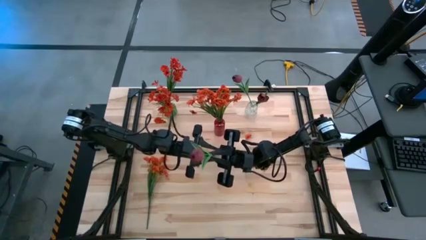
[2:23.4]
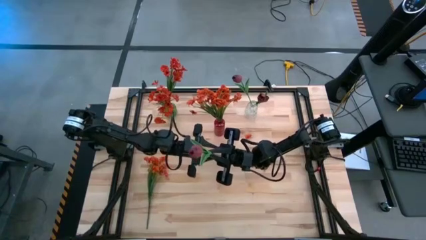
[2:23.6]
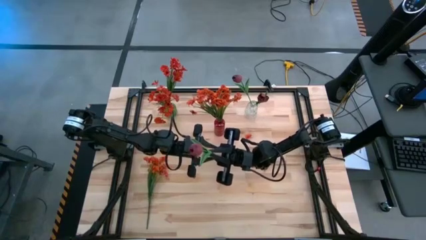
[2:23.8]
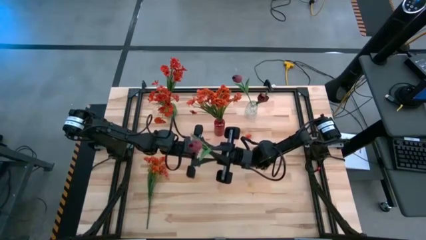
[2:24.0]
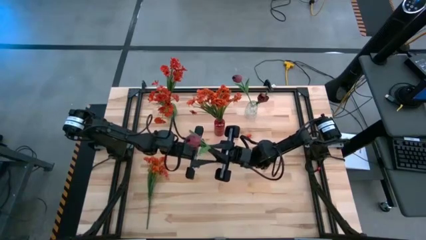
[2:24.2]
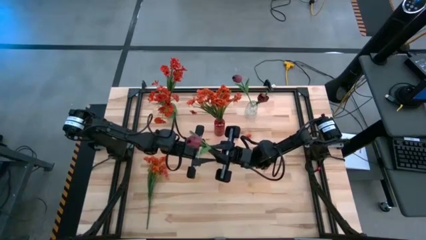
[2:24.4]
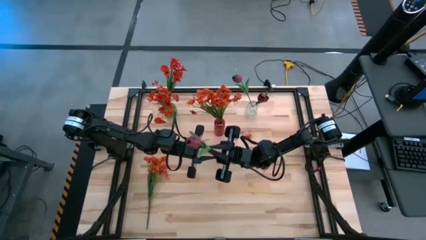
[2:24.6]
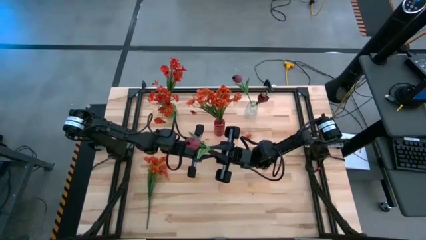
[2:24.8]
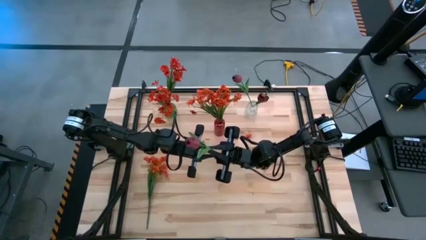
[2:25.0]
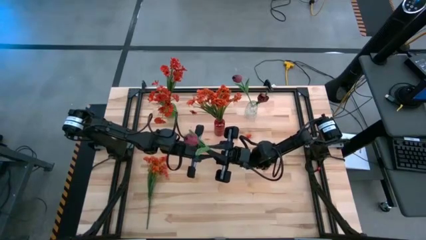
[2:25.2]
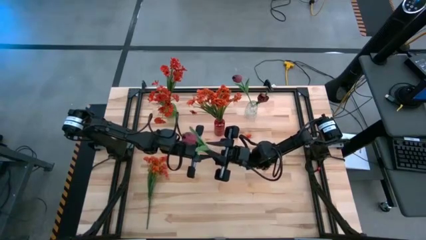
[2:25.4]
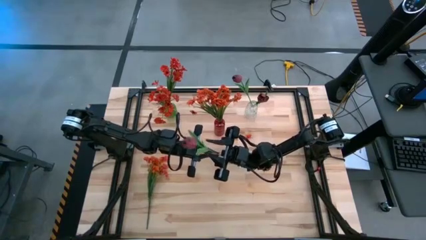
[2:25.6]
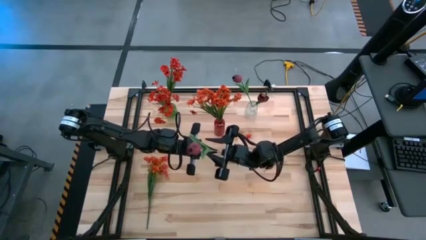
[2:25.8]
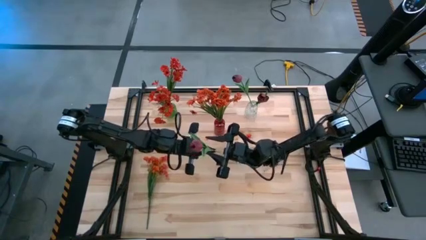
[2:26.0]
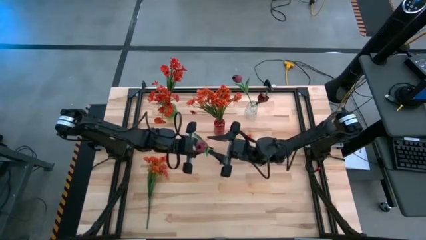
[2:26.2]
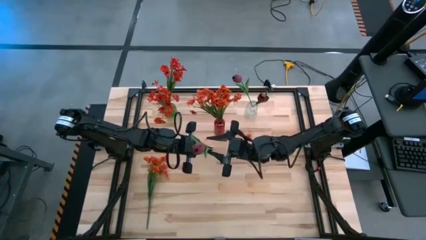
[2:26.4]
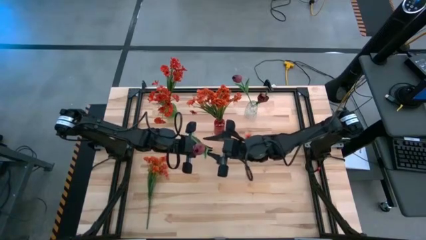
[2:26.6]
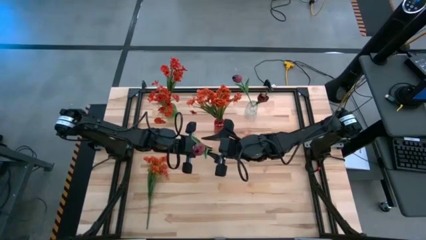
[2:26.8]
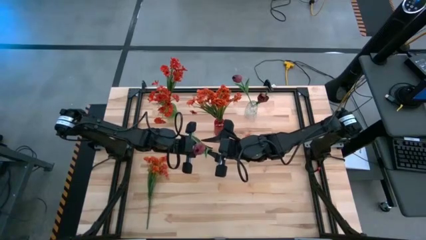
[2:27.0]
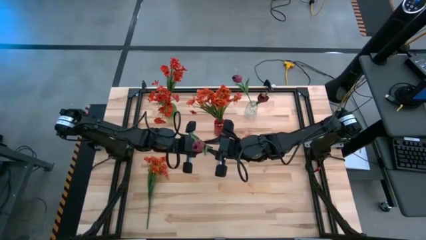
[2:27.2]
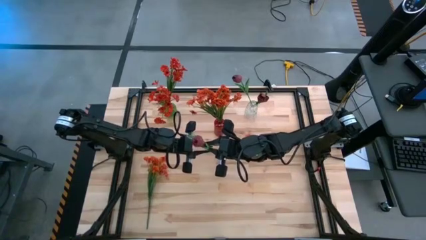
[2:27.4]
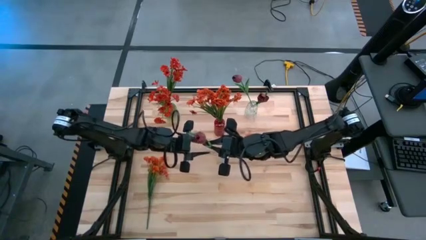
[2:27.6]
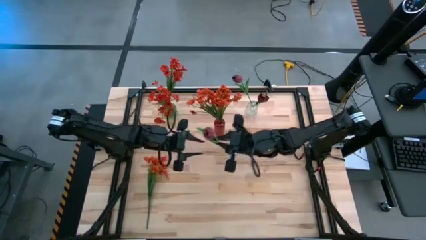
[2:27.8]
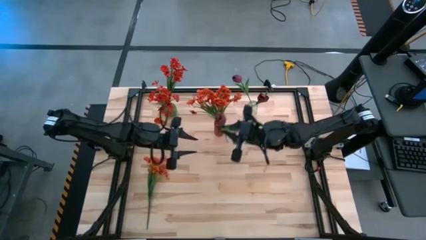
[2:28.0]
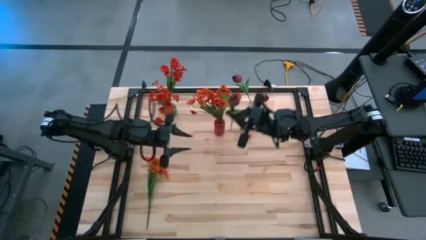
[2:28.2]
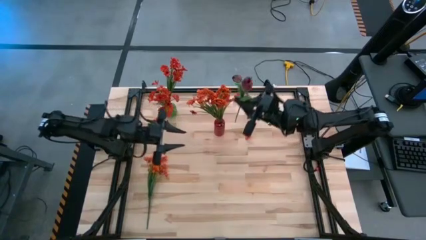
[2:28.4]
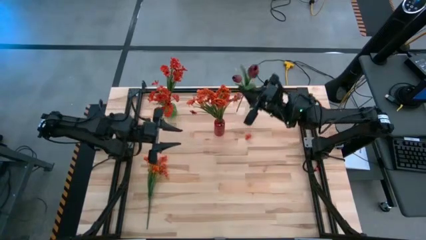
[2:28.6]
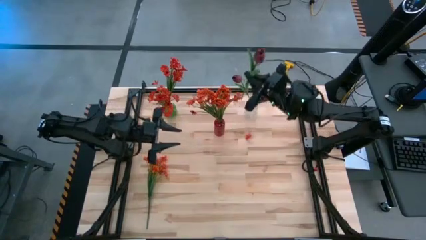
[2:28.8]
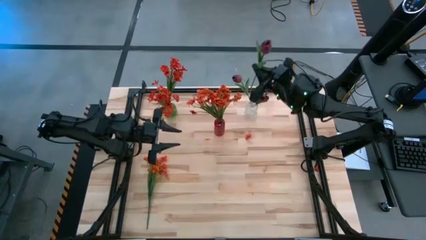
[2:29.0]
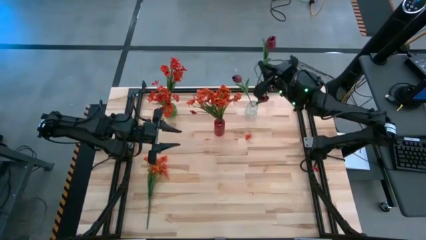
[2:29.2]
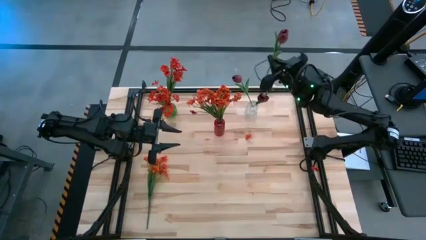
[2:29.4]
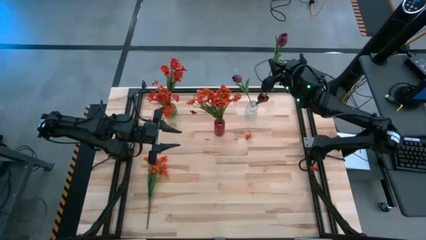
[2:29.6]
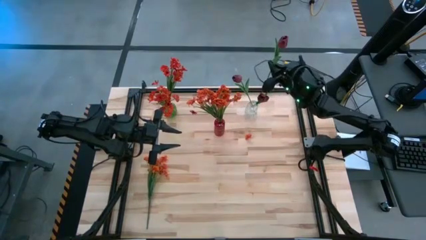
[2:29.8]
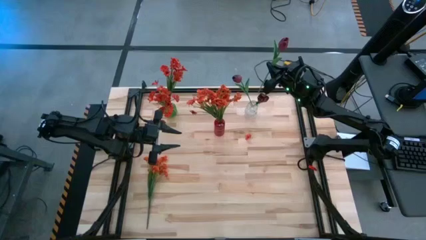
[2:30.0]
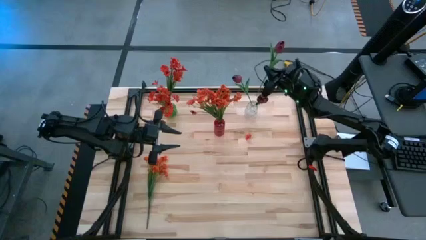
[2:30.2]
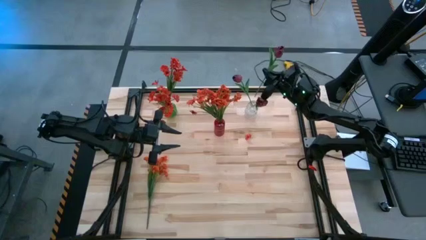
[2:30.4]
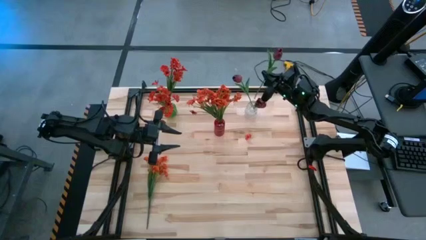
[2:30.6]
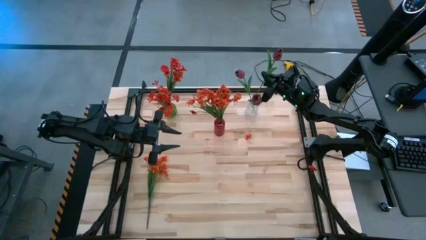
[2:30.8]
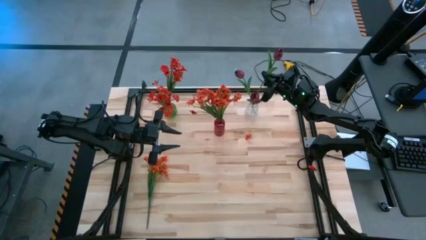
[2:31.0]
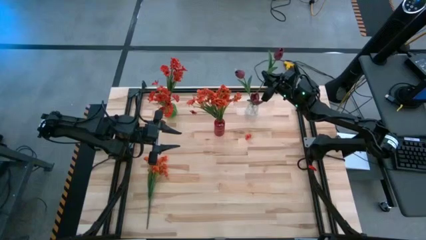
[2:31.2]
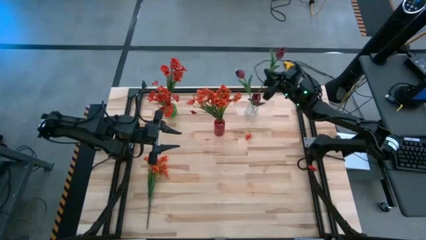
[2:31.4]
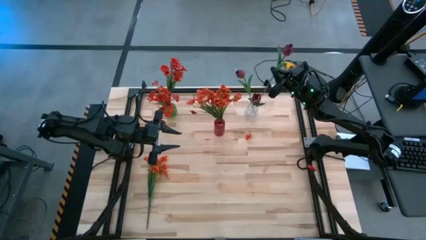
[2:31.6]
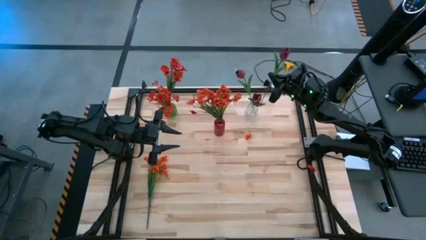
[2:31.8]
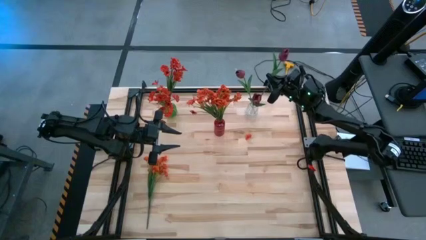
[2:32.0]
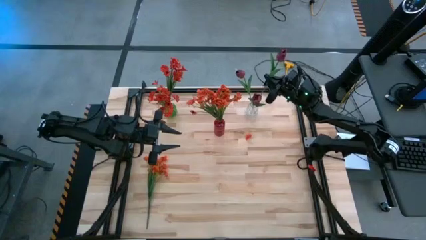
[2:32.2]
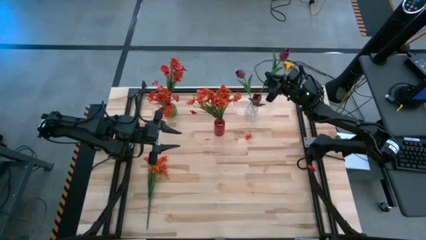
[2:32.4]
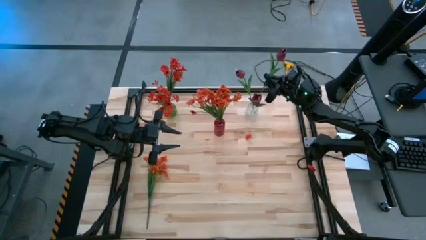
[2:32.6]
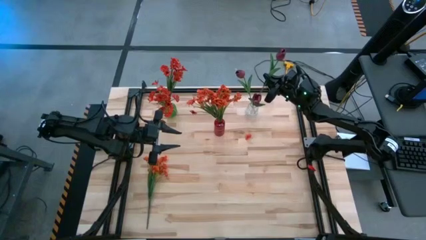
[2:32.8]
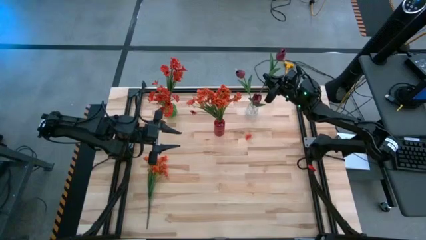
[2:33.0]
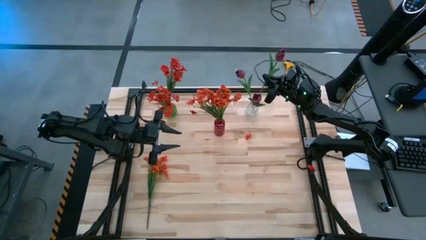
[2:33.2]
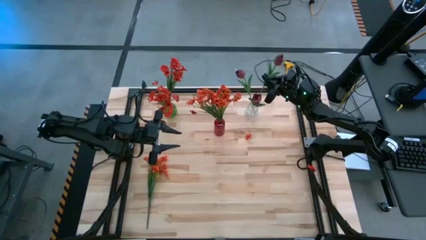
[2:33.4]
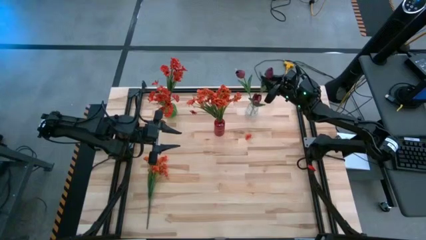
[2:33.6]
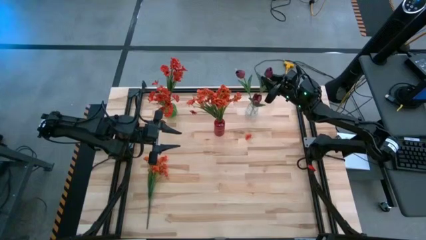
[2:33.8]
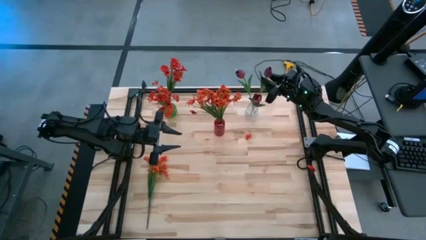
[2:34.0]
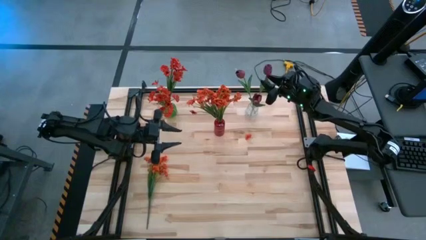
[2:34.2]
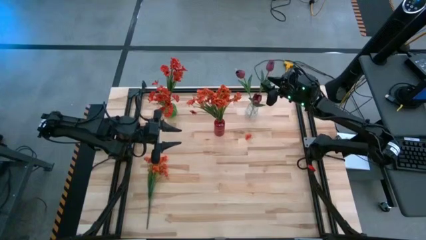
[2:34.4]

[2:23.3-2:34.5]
Task: Sort flowers into vase by color
Put the red flower into the transparent vase

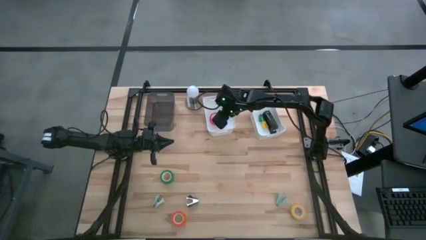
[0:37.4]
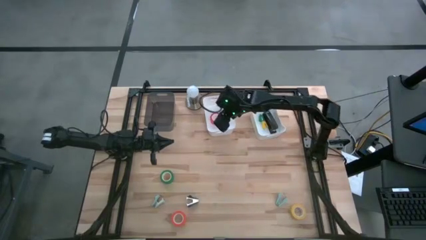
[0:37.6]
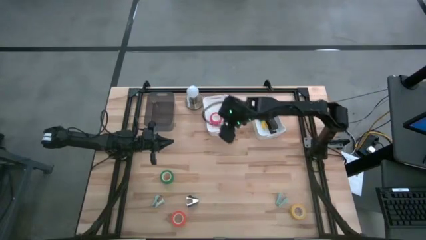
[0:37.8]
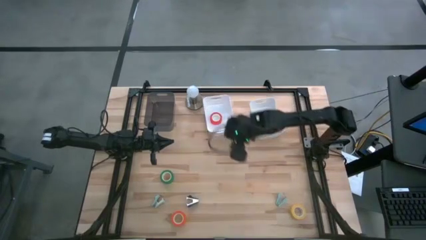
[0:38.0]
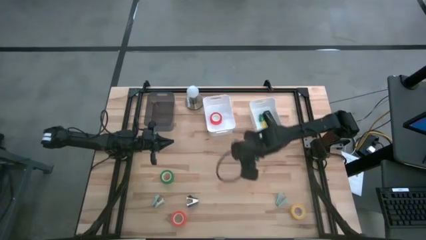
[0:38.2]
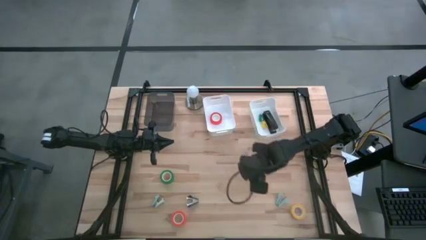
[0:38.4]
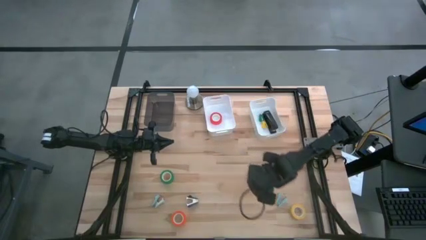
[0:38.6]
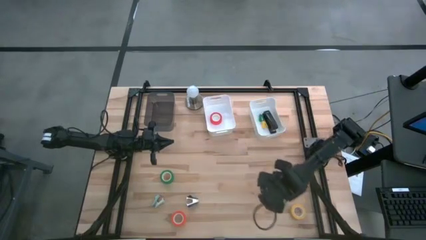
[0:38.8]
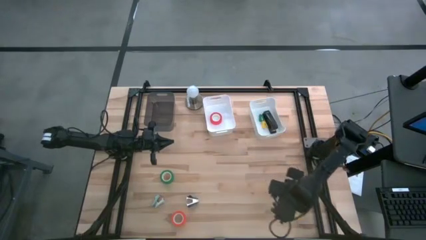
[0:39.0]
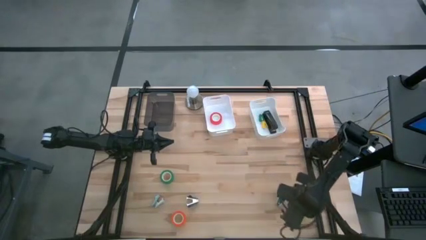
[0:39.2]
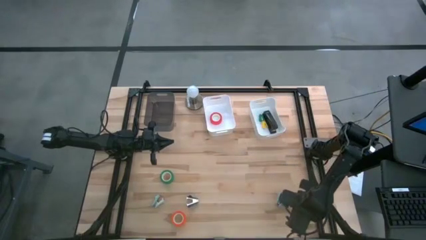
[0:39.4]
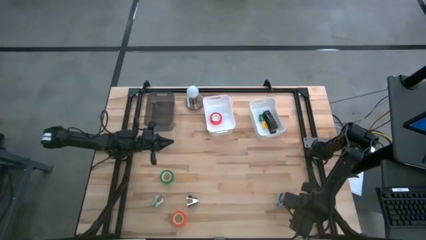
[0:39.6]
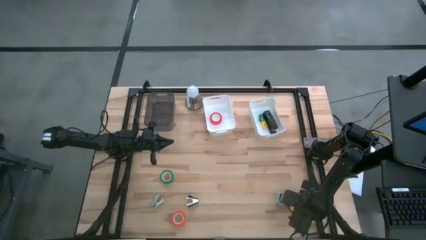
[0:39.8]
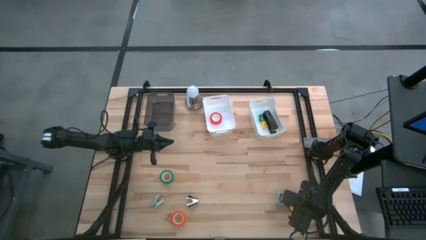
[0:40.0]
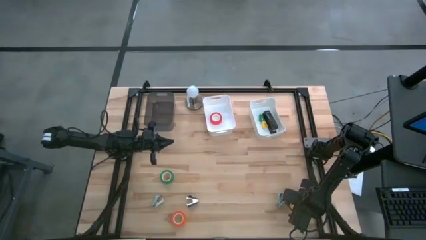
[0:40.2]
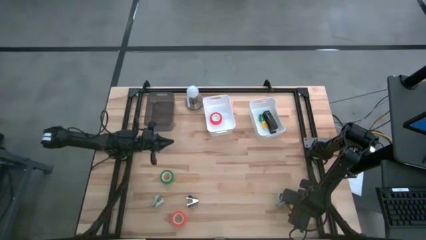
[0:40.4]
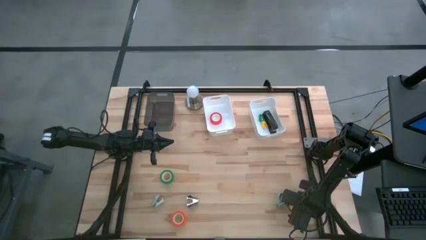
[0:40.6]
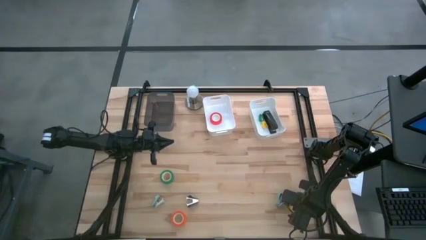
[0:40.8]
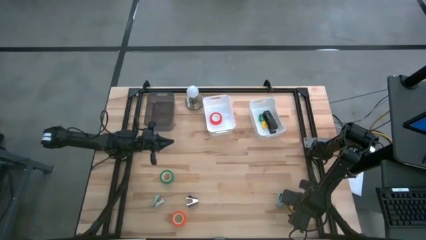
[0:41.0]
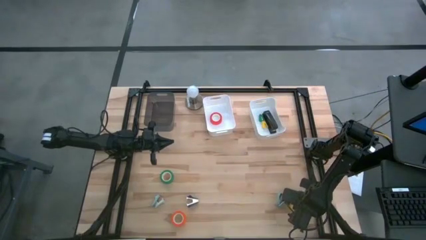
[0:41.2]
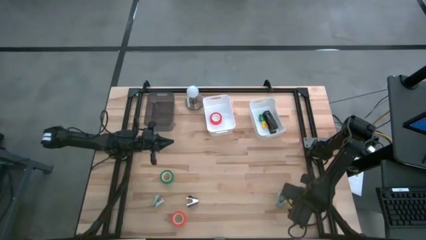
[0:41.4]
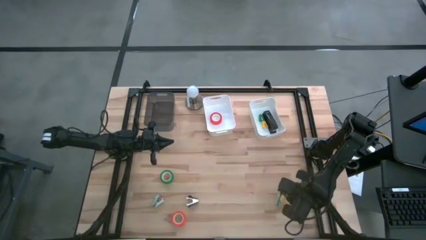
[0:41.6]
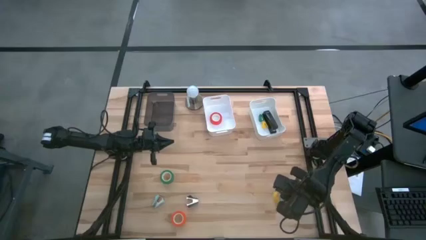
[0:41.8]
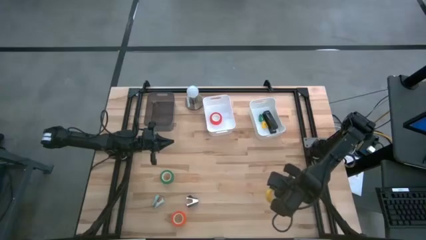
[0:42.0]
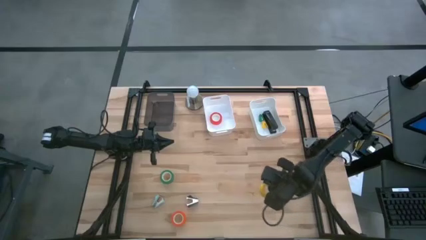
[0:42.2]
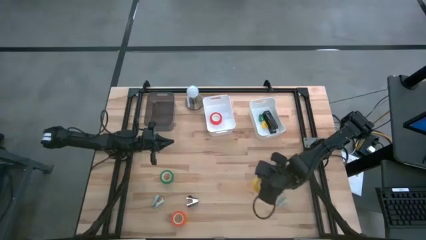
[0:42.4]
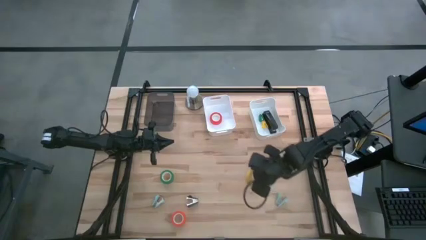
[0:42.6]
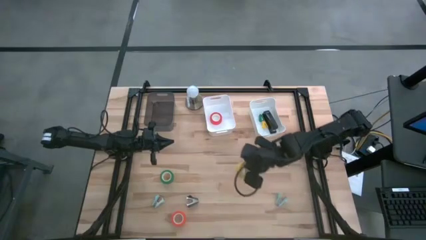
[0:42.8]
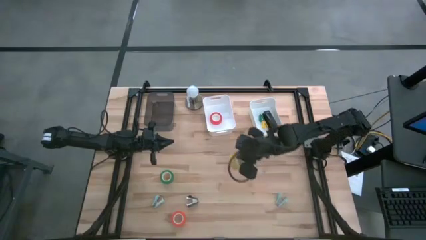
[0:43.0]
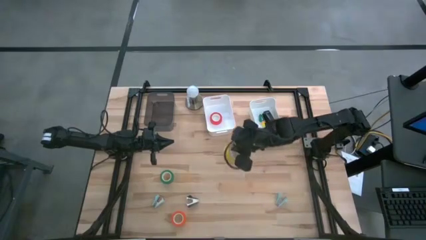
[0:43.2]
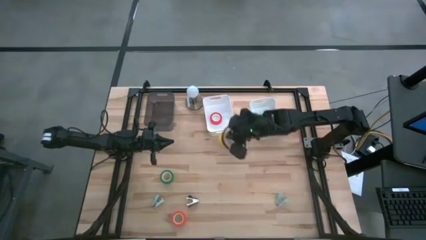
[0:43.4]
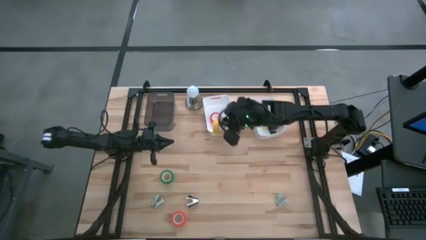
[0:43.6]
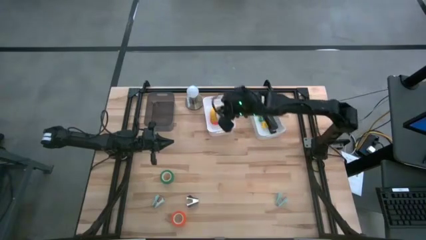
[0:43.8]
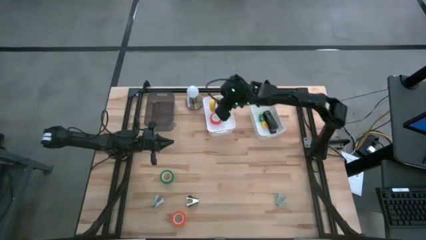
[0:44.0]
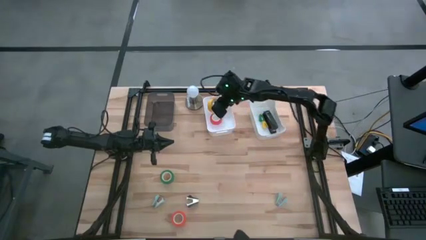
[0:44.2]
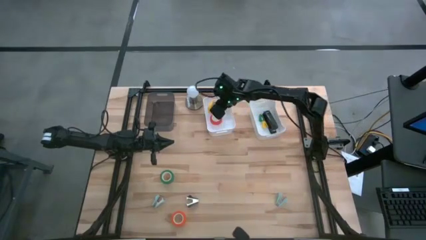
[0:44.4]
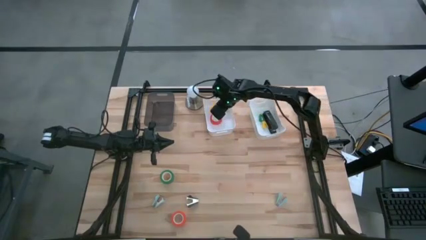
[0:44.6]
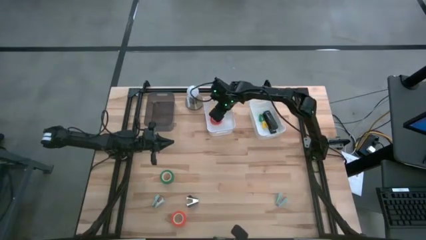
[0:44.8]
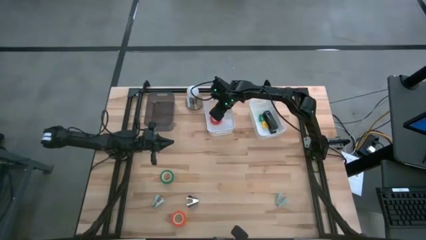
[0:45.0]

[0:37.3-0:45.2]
Task: Pick and place Stapler, Stapler remover, tape
Put the yellow masking tape into the left white bin
